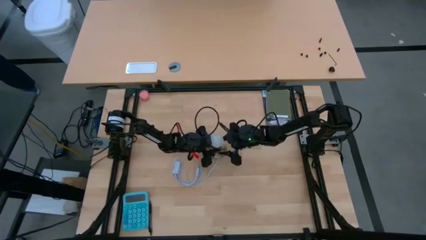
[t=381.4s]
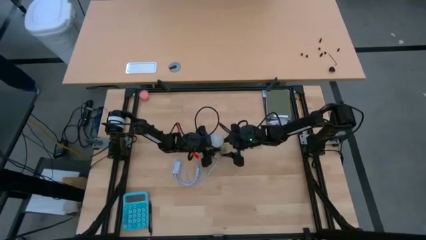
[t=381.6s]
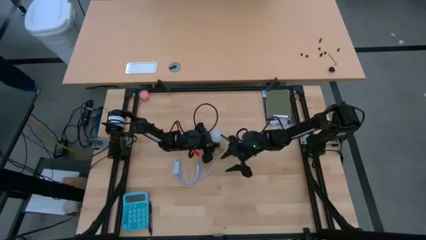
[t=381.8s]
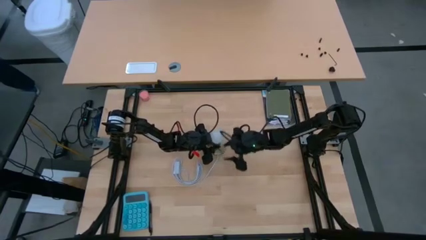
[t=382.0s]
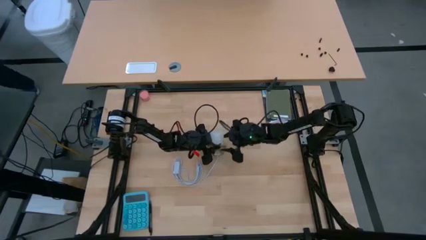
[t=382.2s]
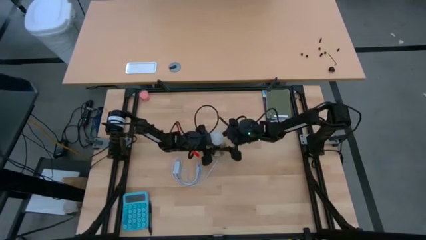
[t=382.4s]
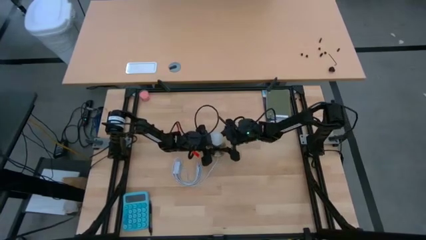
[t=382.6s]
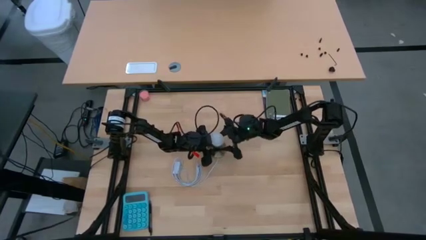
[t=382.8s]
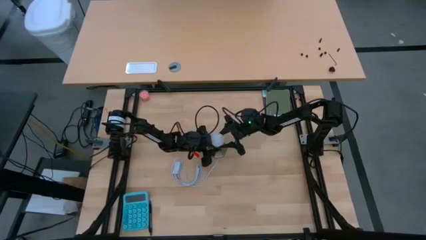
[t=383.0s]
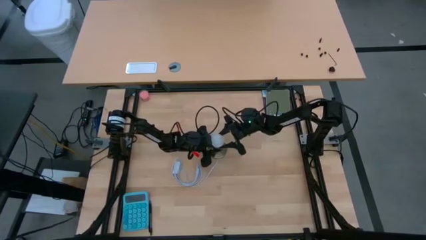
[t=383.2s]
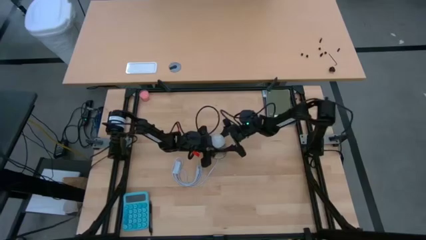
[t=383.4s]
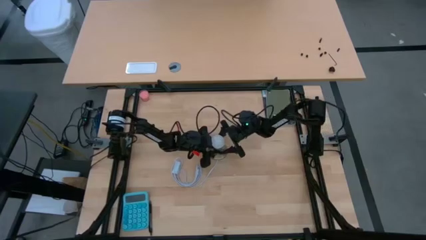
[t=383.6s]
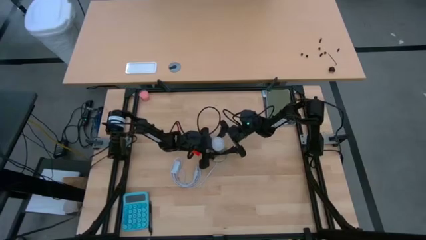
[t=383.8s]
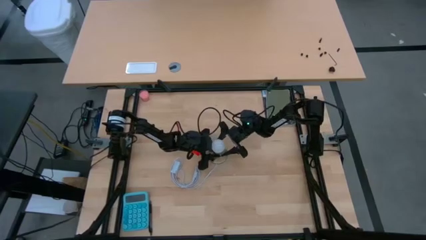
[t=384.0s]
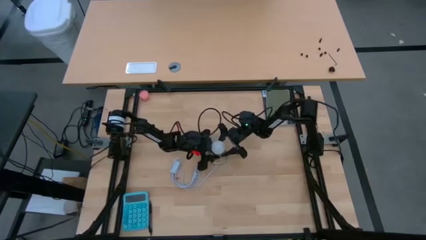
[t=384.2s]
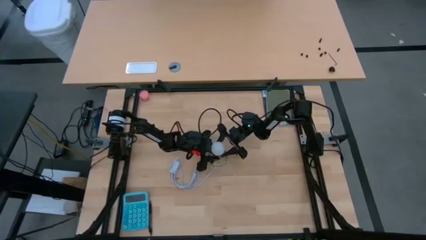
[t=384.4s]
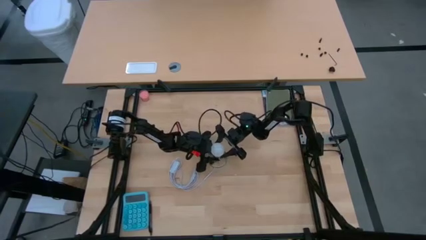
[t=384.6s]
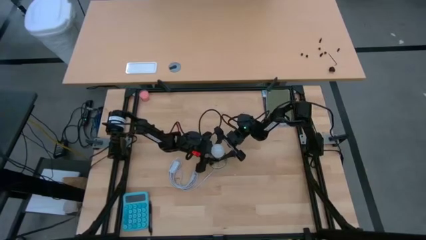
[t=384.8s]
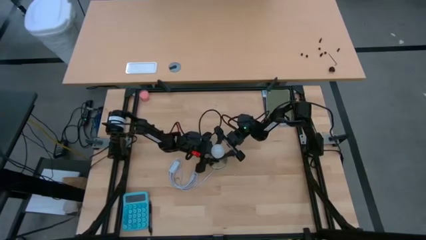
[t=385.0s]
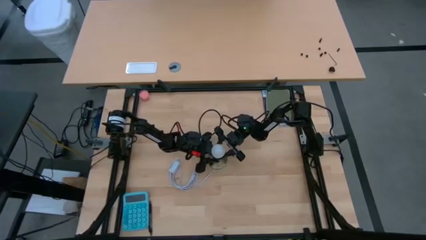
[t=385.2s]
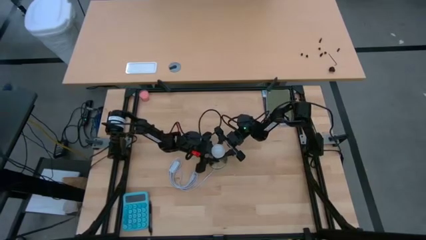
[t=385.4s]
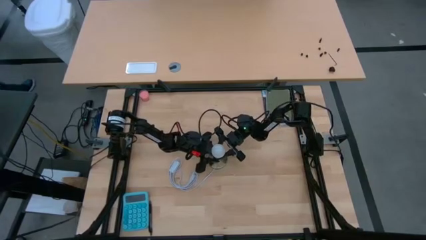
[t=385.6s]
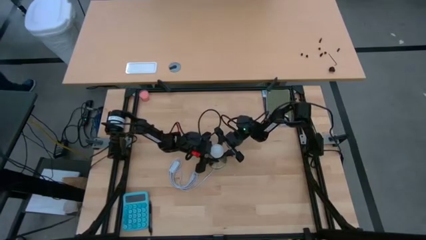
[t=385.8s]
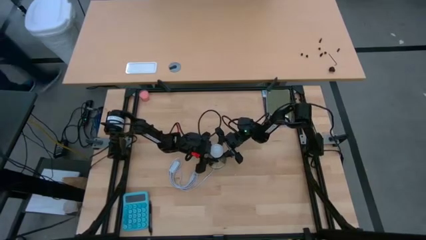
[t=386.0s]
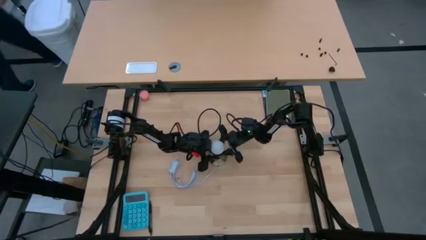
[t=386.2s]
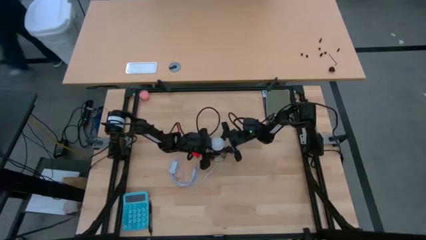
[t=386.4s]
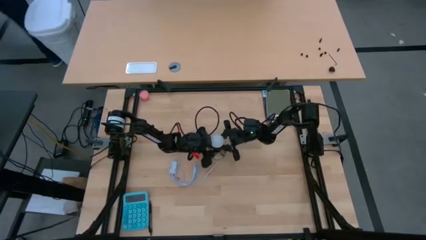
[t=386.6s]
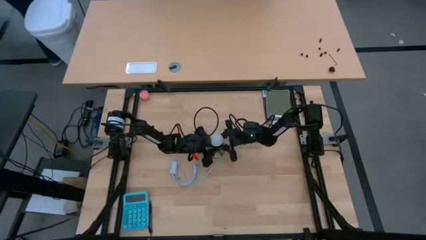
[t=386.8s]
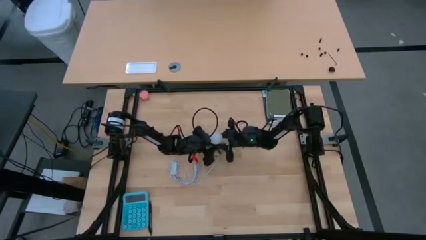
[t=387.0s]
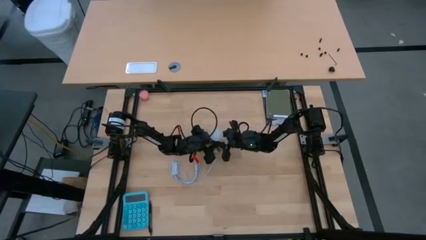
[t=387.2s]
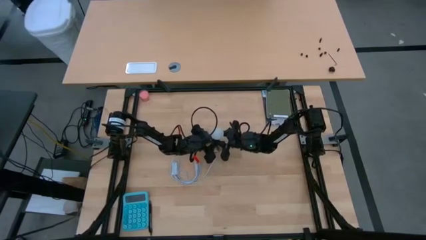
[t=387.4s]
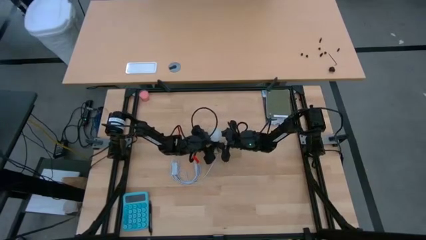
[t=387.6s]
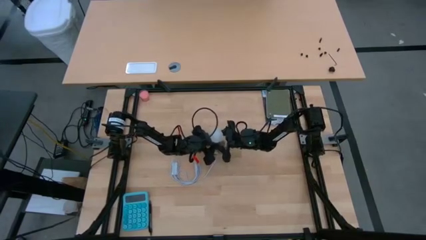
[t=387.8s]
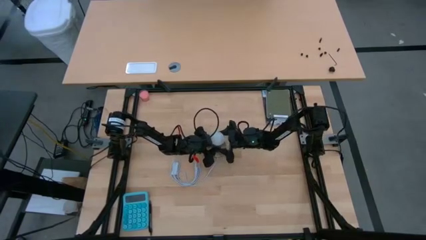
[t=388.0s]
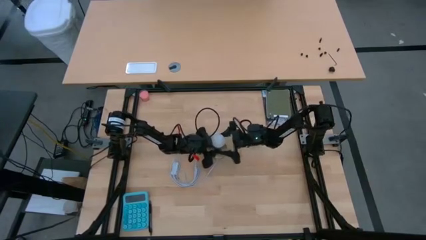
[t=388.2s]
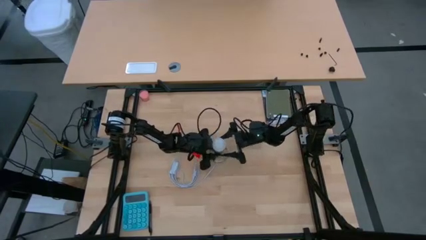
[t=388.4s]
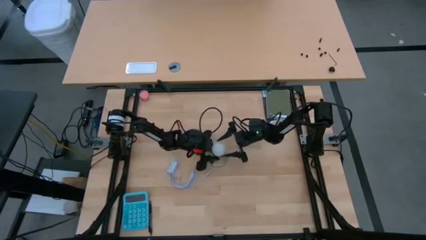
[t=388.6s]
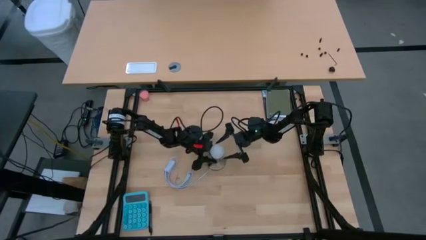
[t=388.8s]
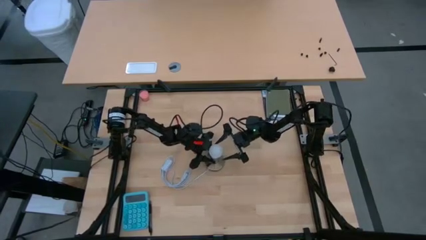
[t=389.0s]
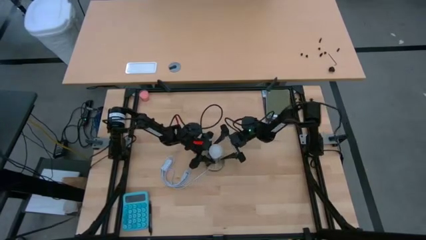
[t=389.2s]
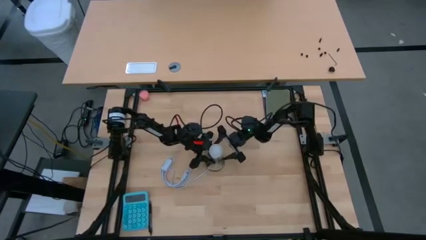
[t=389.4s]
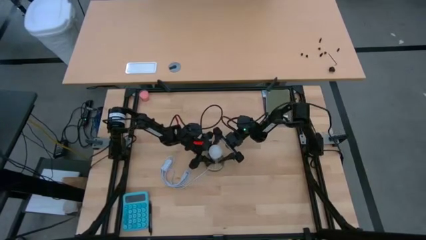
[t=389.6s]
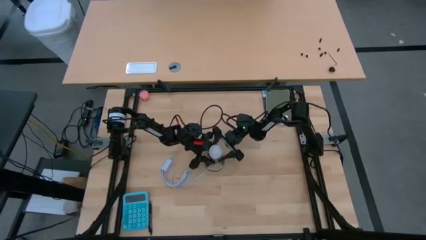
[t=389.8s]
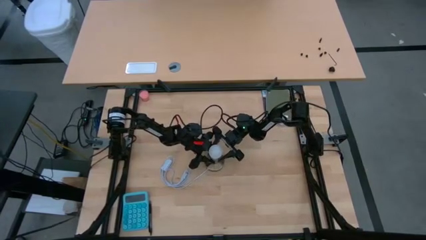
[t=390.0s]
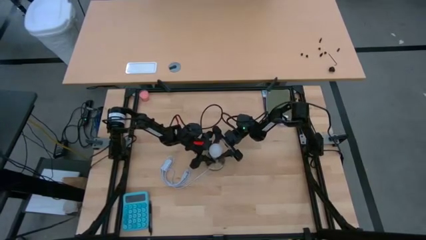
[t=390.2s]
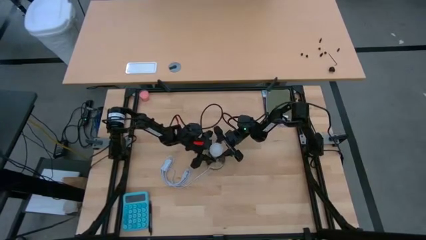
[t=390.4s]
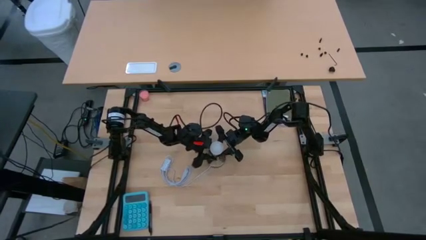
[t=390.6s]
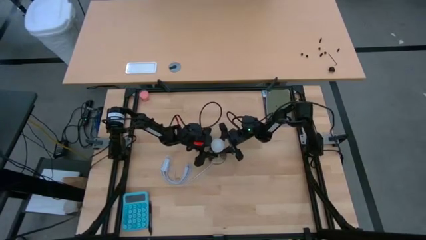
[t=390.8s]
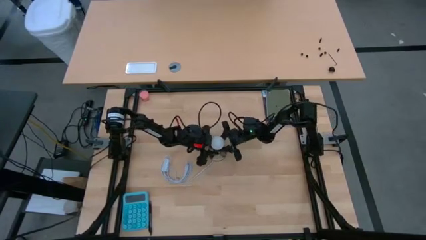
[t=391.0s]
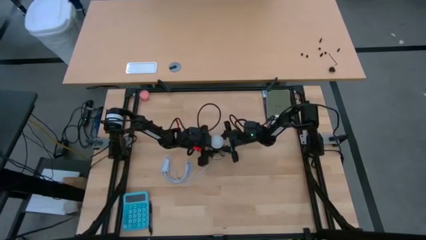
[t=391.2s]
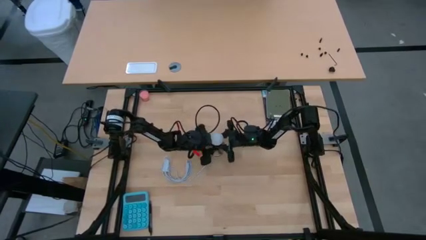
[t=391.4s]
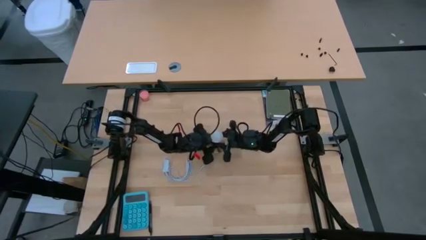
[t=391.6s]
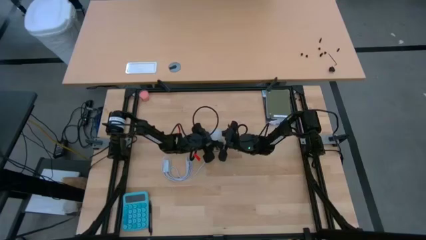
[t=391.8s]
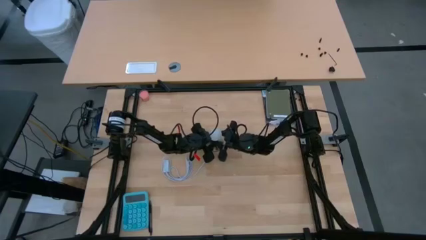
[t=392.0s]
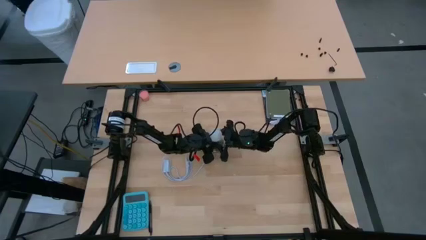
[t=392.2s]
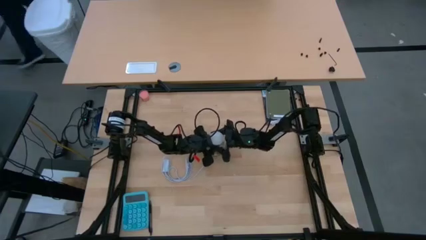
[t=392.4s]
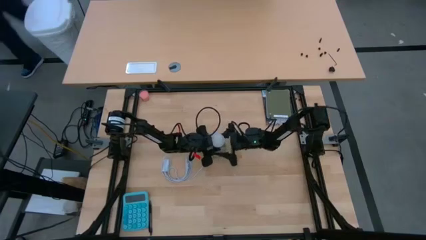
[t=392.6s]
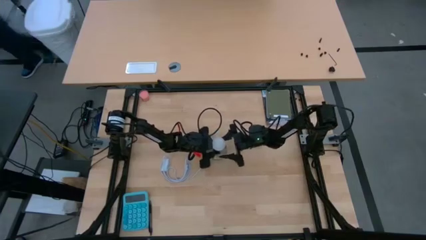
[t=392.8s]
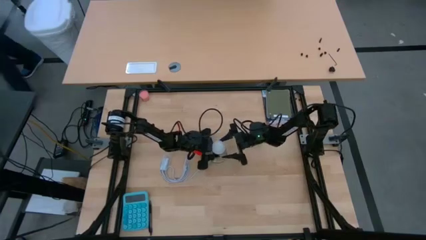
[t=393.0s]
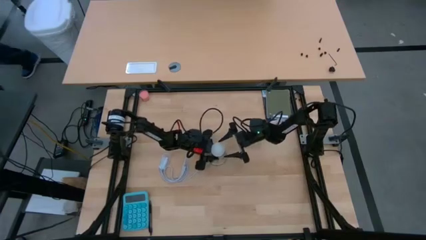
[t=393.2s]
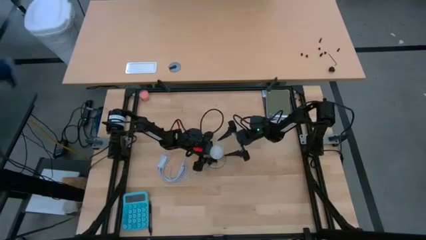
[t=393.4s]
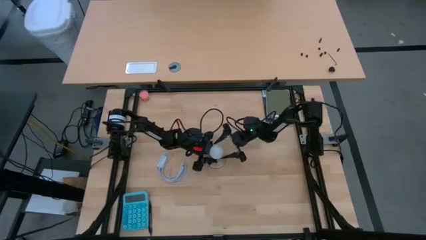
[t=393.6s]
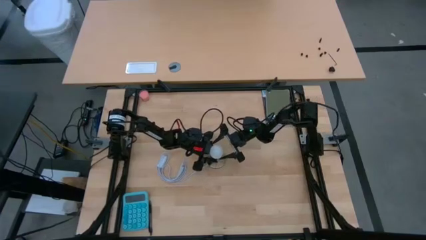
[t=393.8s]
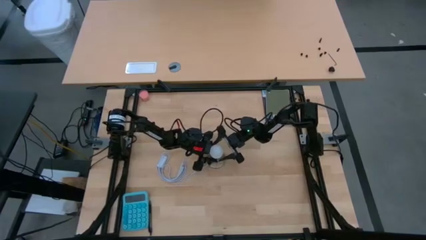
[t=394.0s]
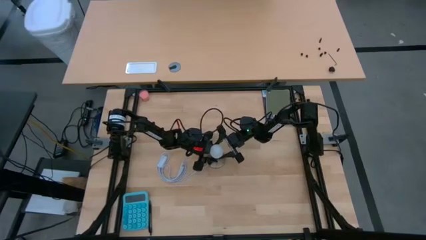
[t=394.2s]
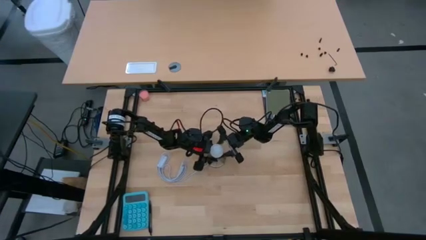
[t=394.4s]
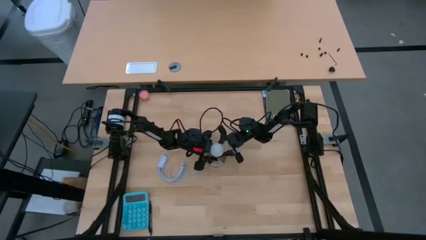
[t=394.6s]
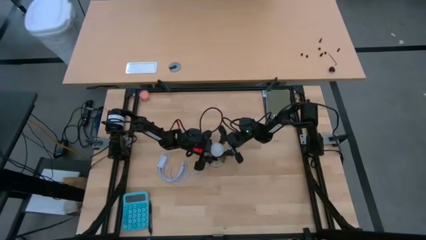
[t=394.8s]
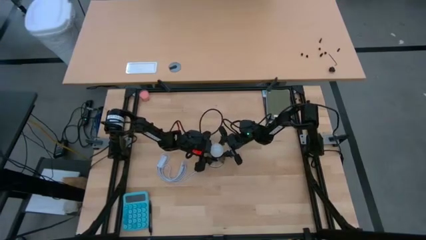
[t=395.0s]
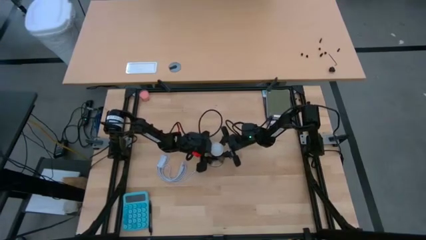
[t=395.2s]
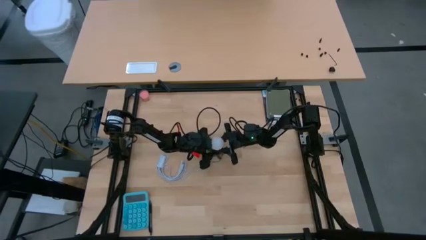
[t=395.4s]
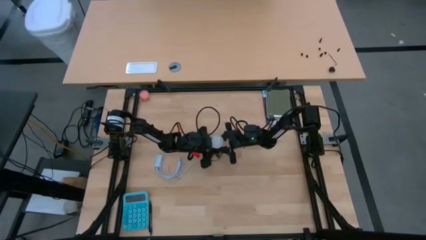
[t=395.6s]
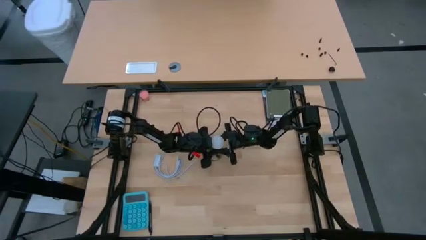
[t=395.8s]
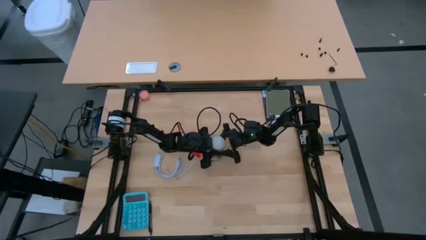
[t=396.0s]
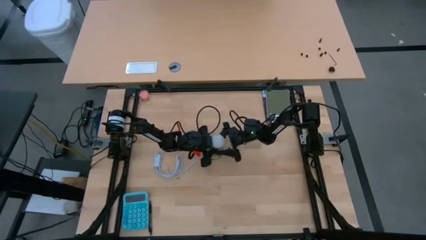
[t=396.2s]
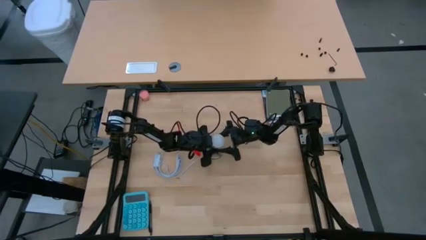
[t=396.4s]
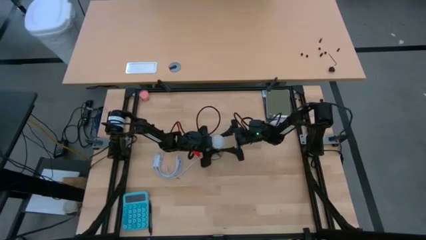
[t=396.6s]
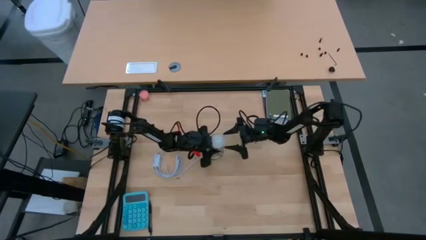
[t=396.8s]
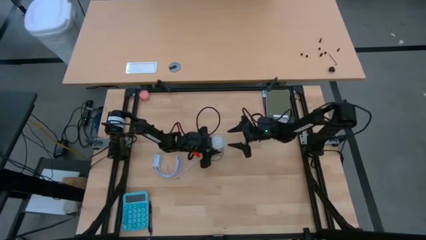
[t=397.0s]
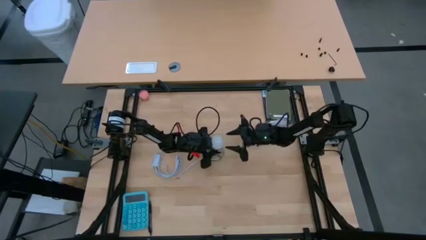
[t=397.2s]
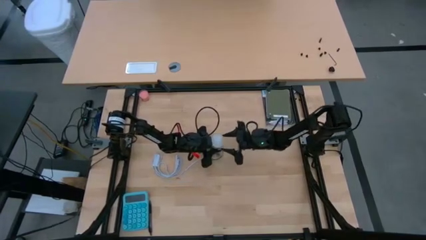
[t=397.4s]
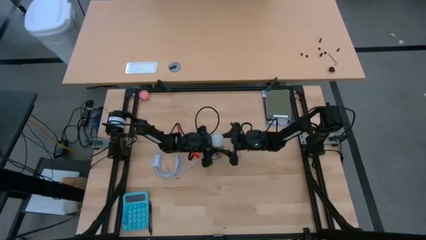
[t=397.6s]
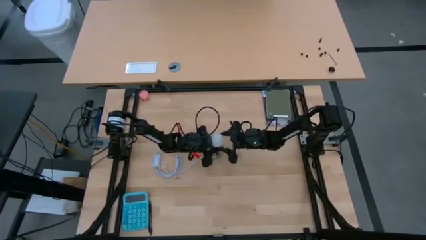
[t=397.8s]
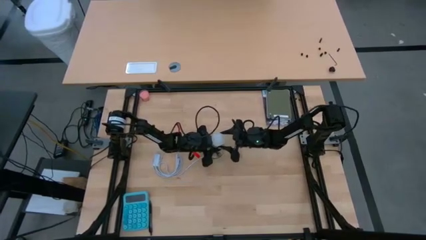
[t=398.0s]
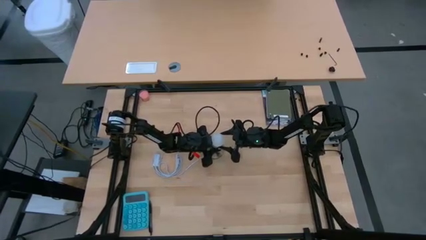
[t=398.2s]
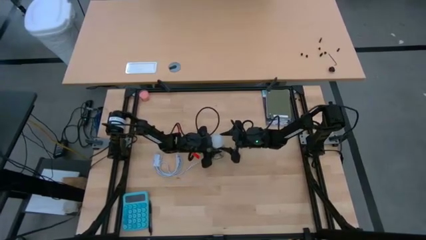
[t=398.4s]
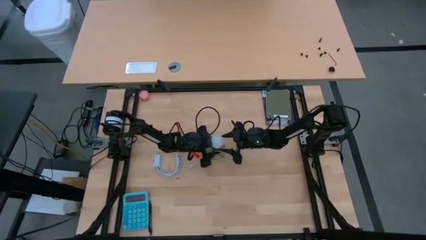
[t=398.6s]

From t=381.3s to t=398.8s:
Task: Screw lightbulb
Insert the lightbulb into the lamp holder
